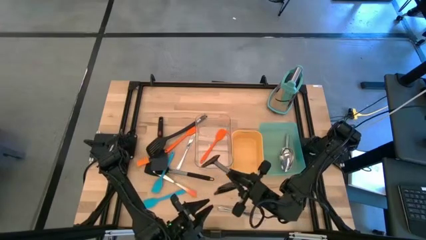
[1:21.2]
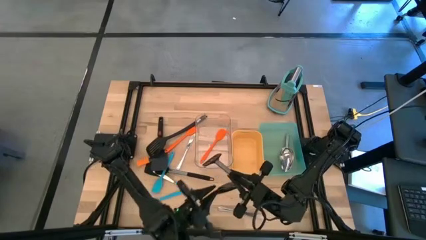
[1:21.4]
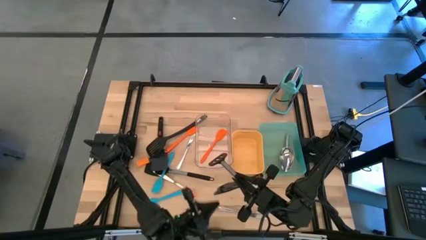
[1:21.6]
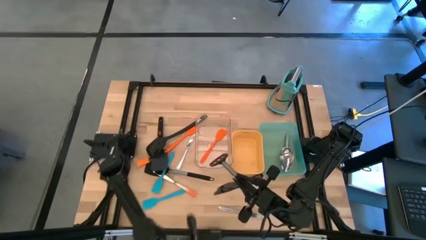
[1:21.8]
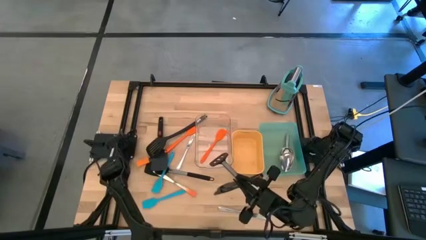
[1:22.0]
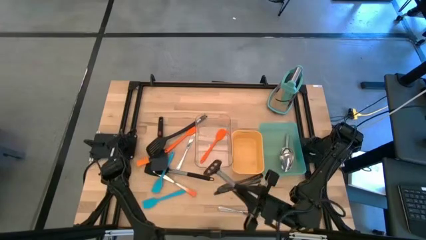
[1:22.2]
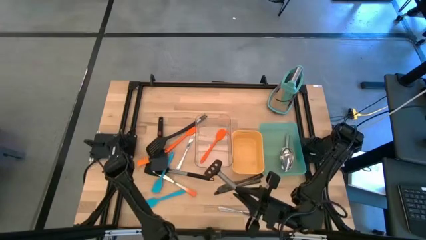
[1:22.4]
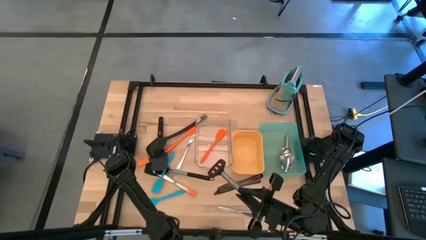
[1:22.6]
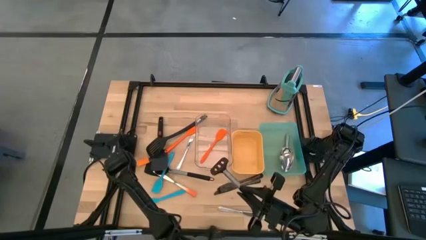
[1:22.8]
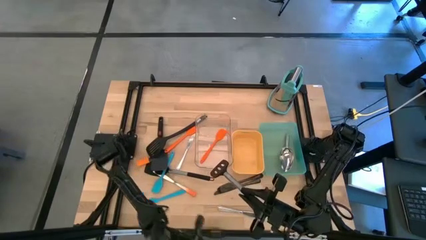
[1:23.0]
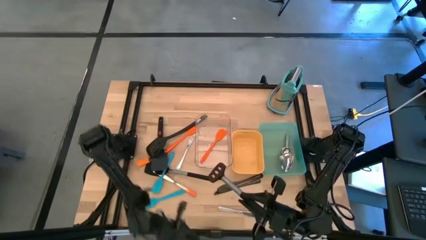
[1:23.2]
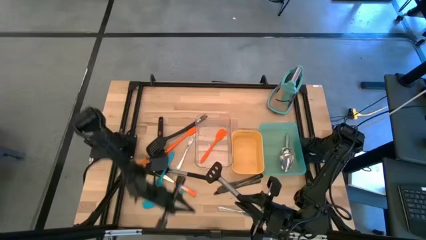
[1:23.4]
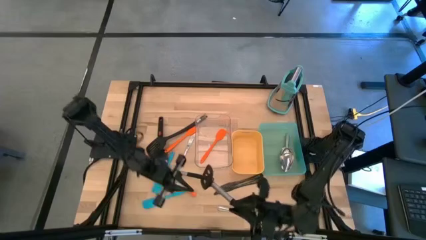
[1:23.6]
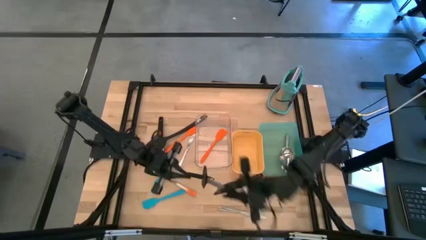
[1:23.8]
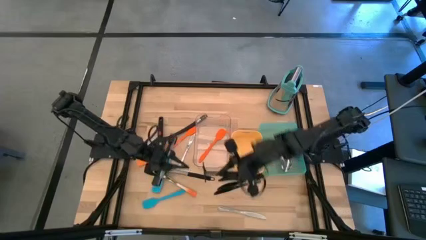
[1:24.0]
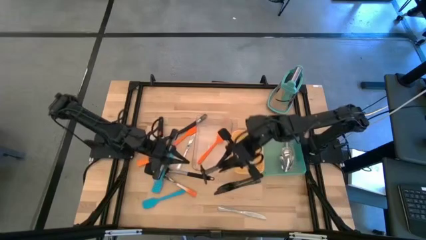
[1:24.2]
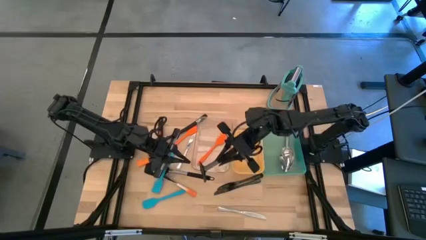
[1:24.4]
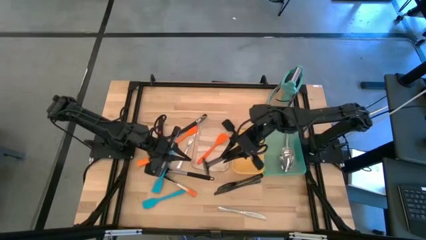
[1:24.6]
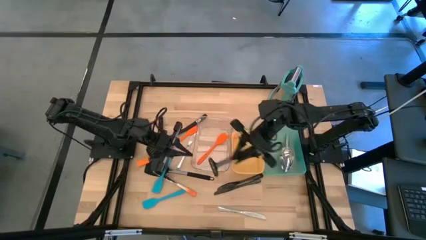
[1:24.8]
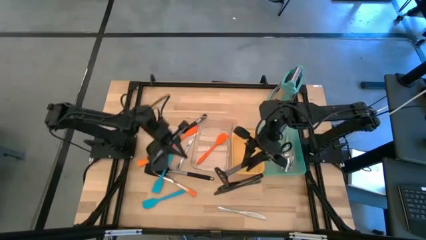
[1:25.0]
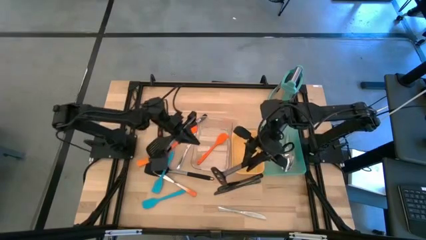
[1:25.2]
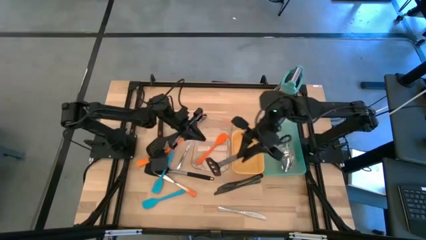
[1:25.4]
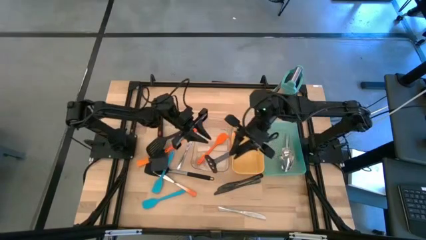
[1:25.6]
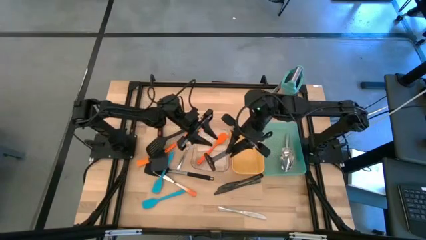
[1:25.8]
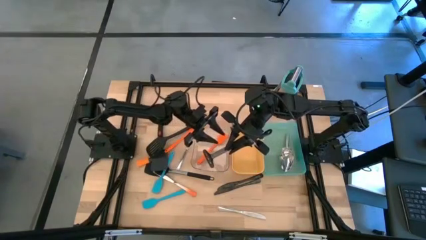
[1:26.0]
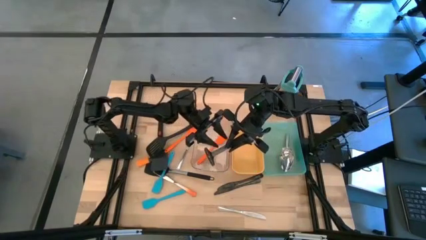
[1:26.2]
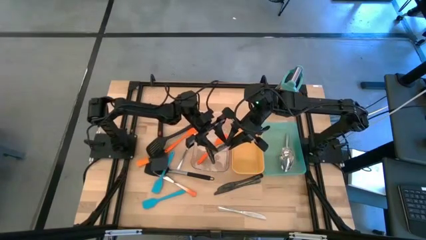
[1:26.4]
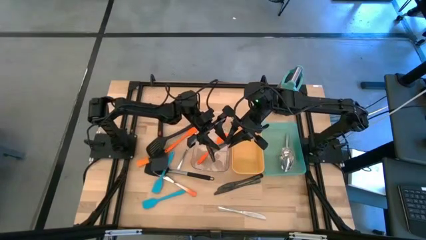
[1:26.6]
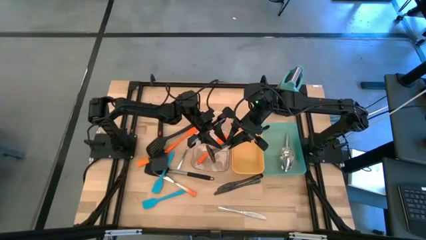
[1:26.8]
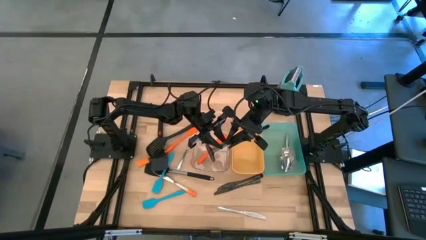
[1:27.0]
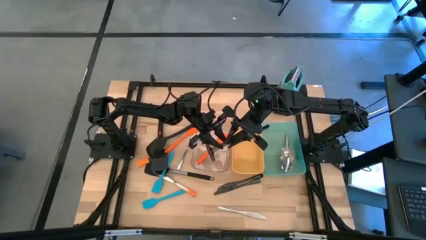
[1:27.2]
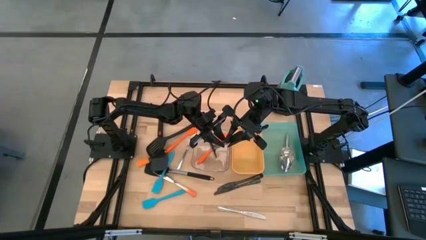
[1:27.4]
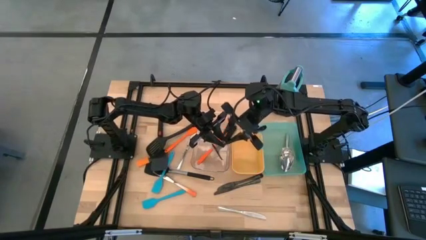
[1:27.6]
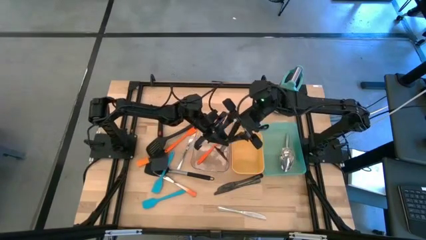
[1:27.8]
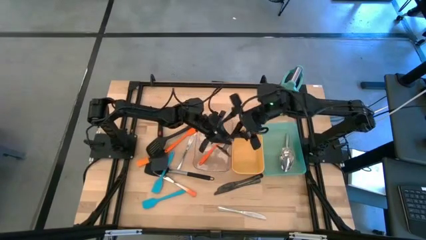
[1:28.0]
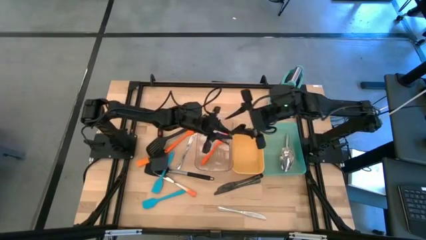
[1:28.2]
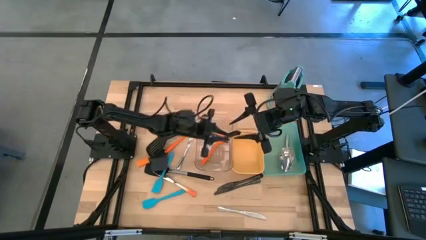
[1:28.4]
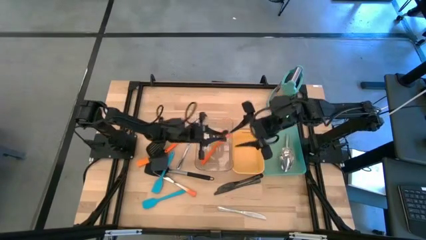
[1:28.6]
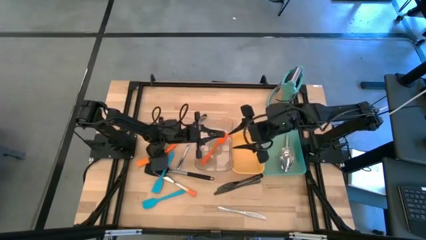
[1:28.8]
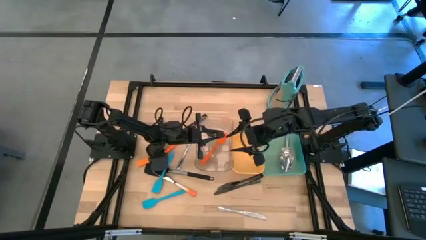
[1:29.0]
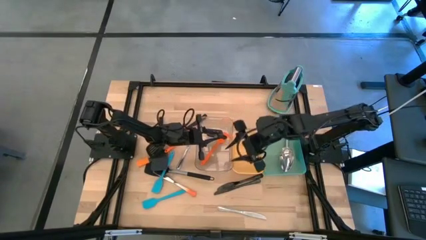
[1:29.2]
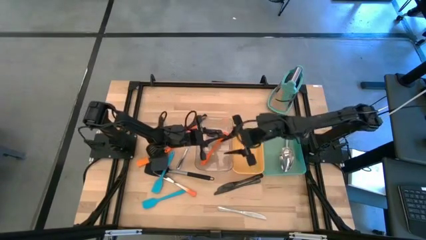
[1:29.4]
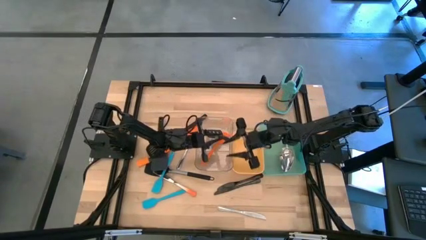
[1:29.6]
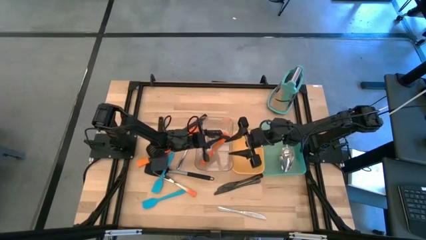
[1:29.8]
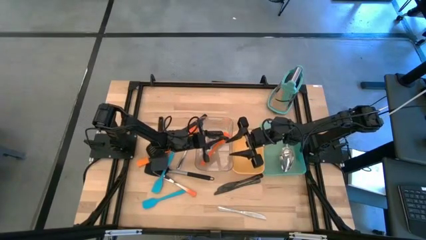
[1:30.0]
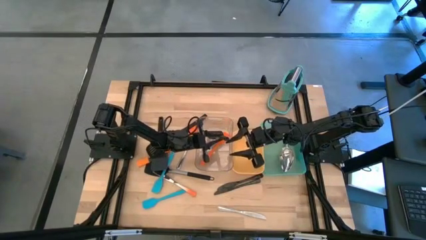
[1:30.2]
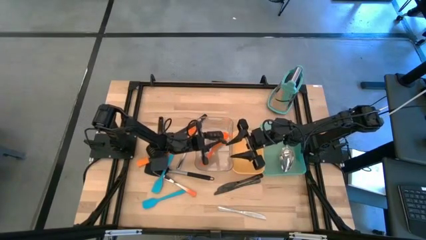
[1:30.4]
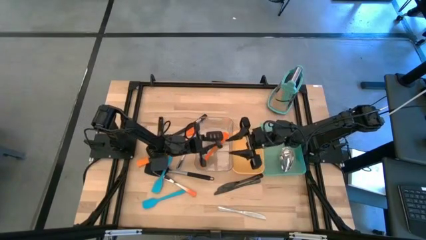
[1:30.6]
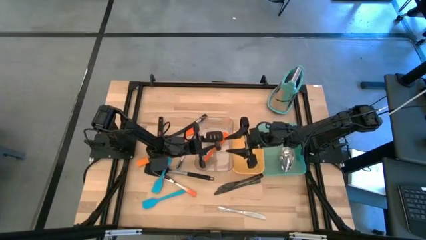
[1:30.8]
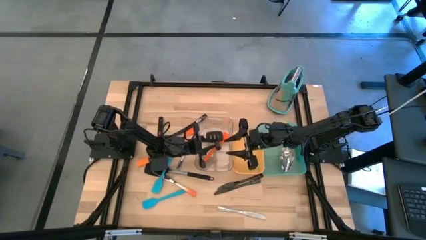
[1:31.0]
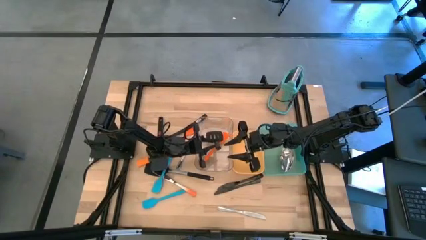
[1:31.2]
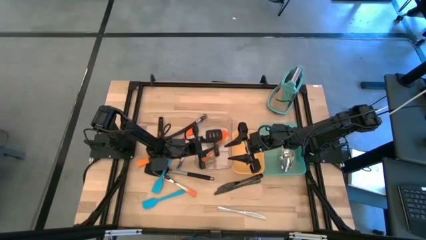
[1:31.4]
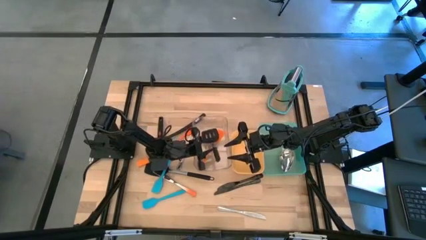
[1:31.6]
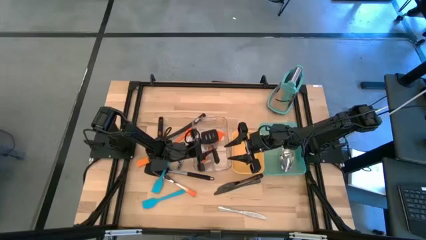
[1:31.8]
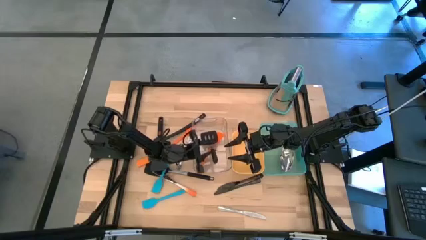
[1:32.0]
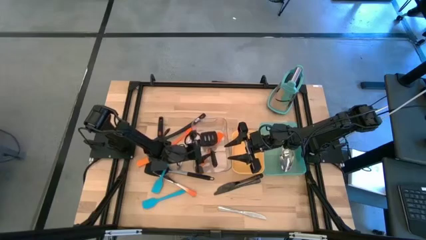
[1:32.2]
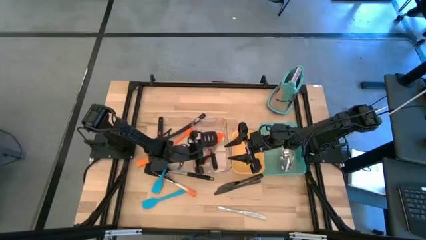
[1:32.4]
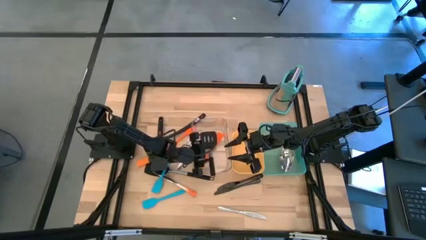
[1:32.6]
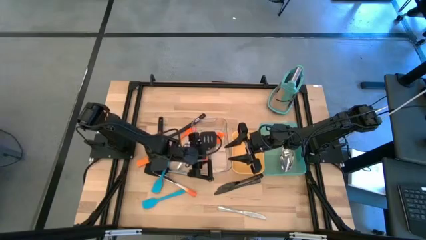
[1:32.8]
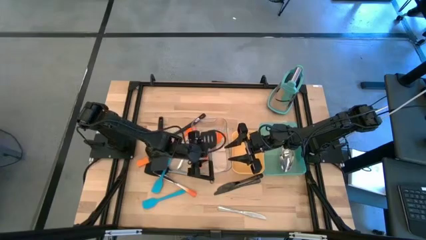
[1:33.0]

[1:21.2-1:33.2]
Task: Pick & Place Kitchen Items
Put the black spatula into the transparent bin
